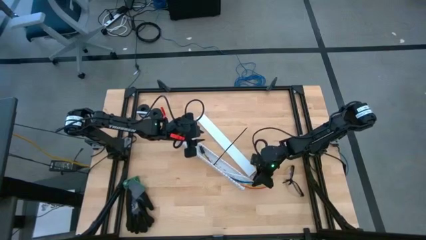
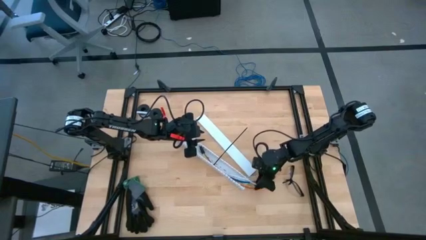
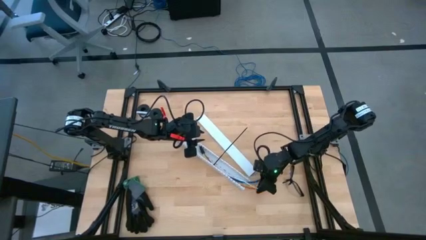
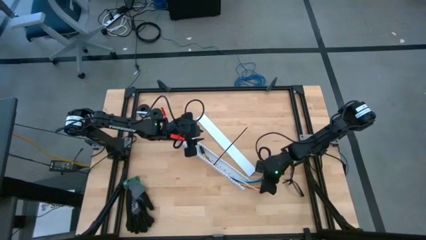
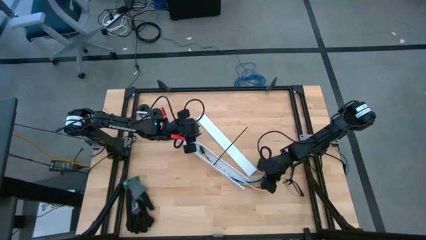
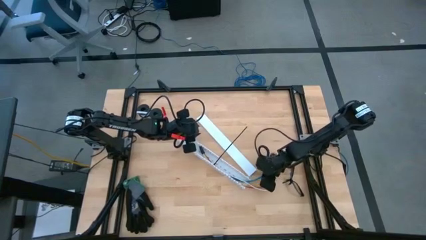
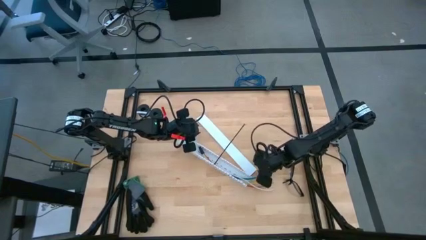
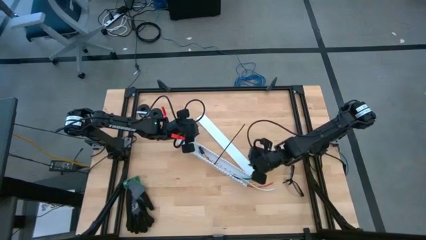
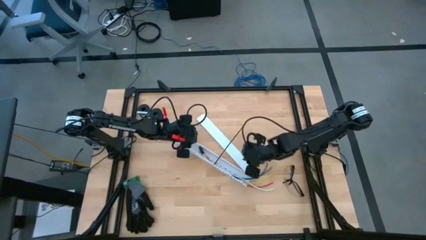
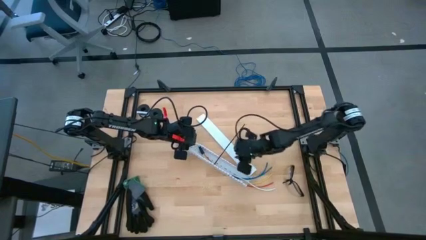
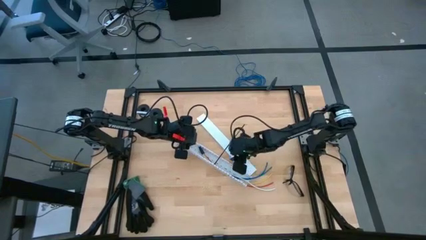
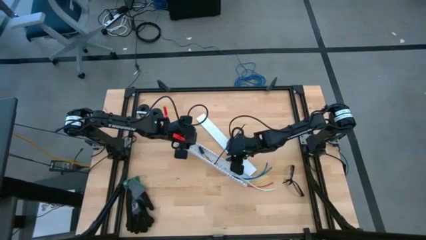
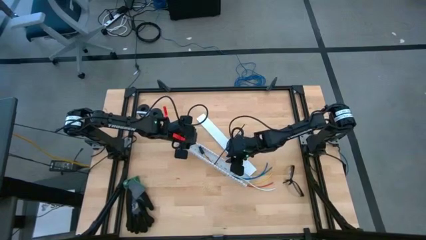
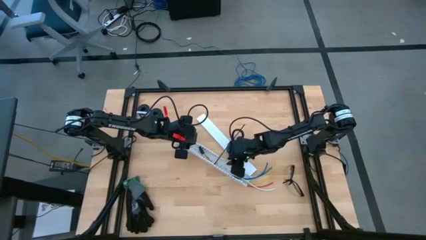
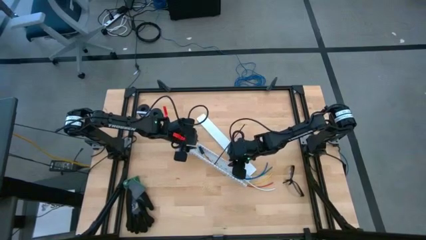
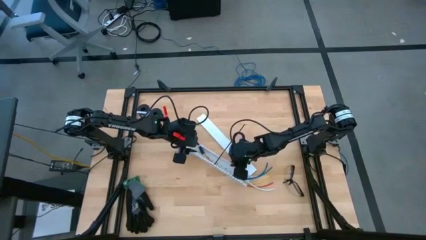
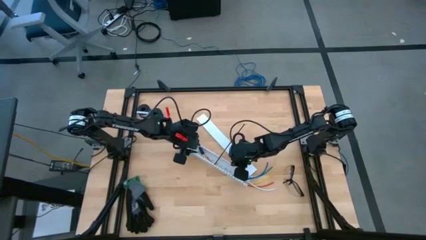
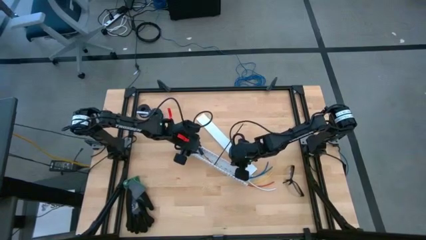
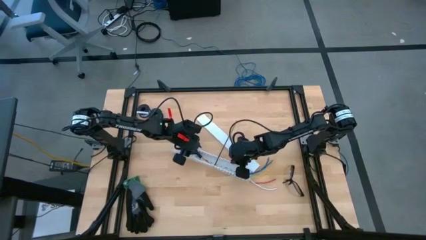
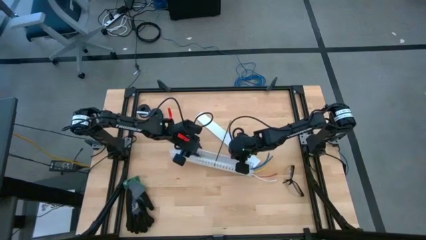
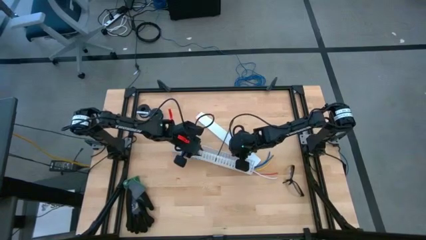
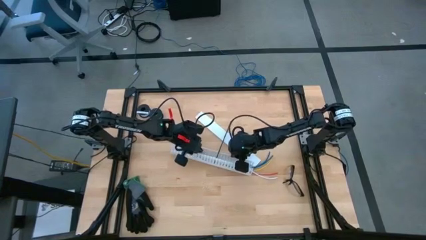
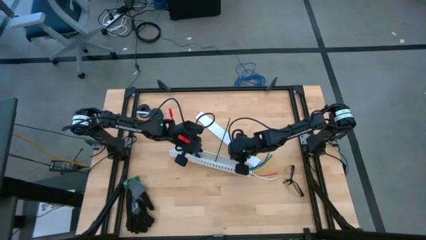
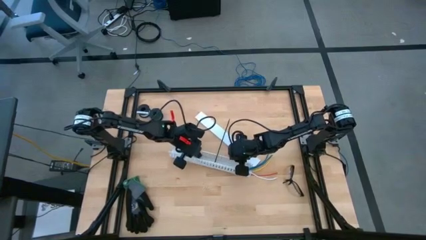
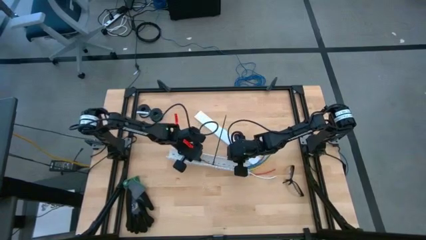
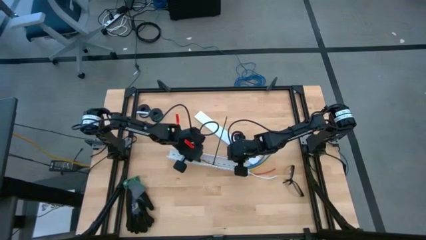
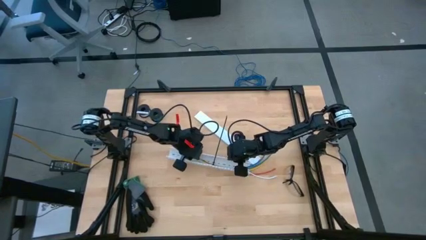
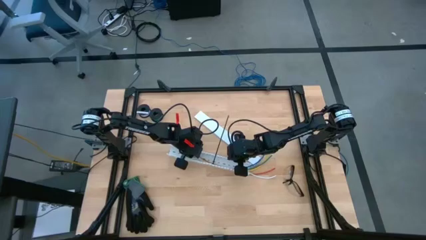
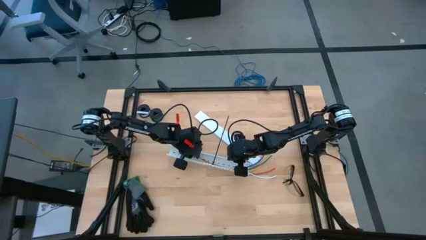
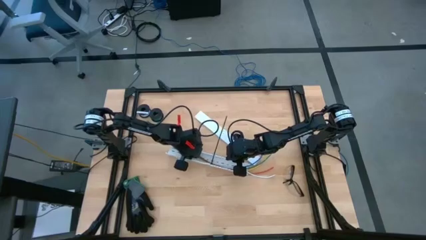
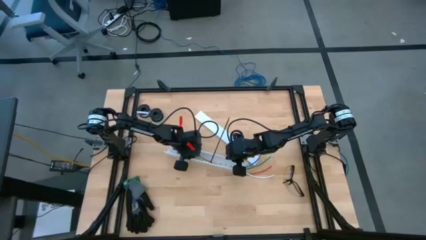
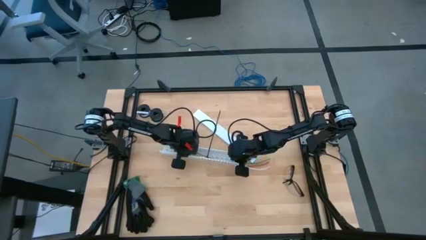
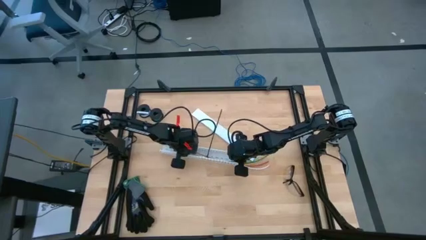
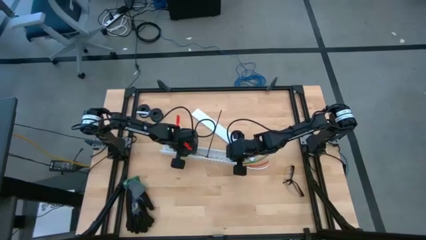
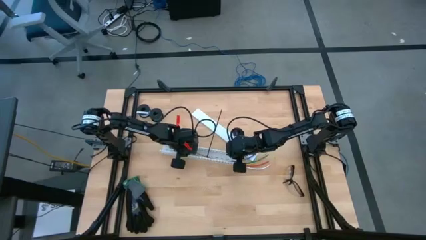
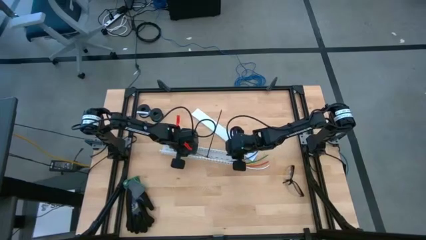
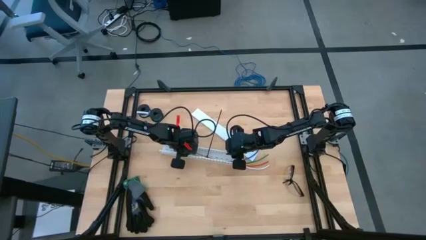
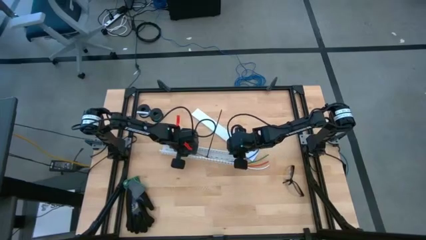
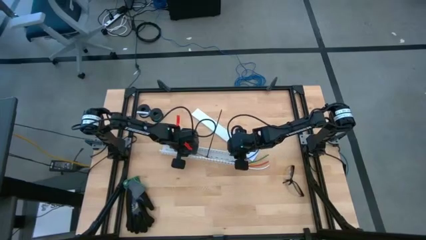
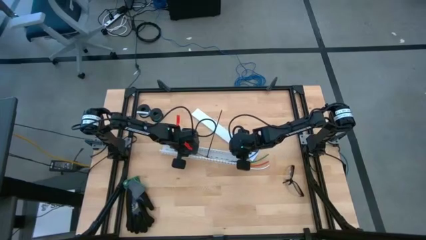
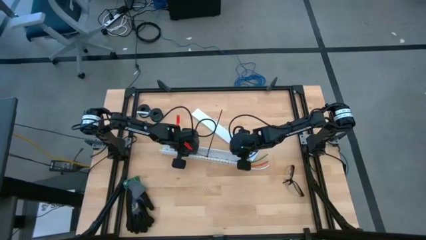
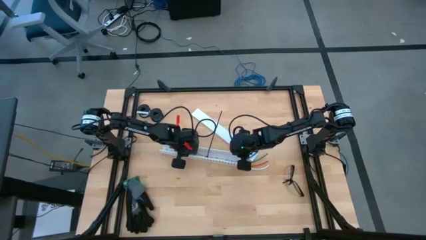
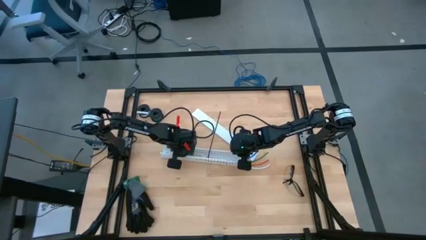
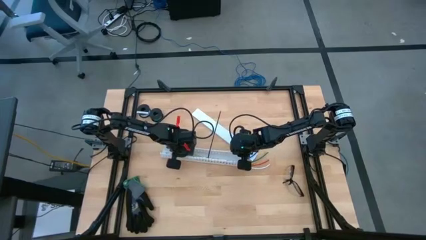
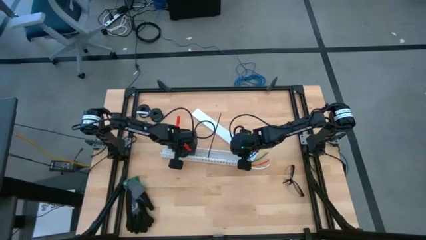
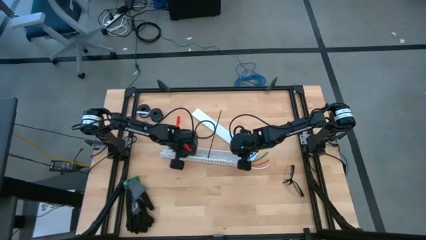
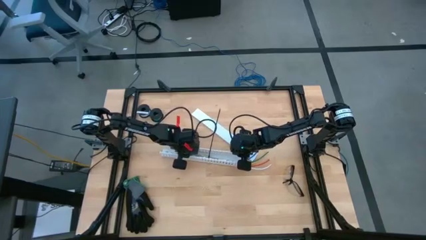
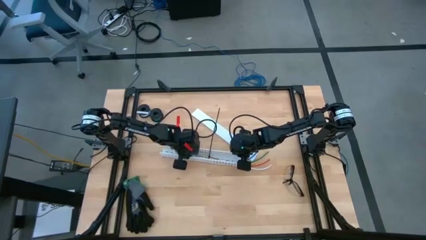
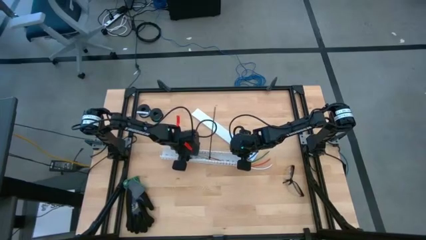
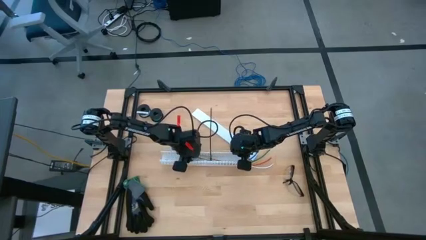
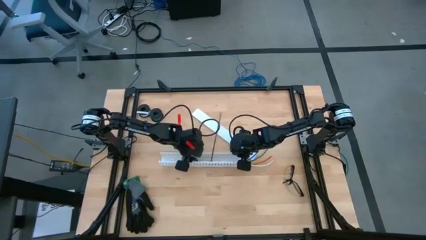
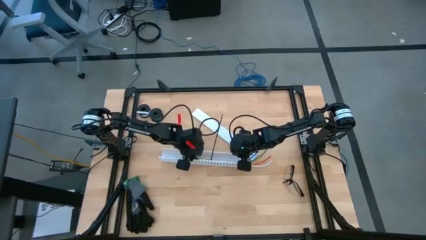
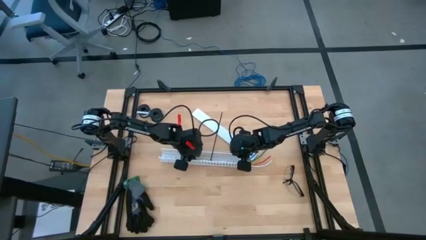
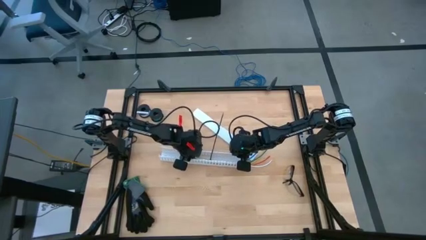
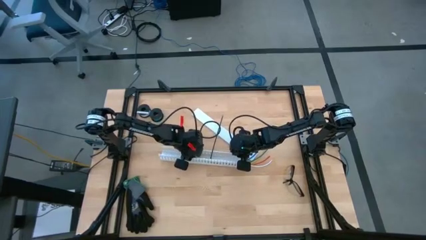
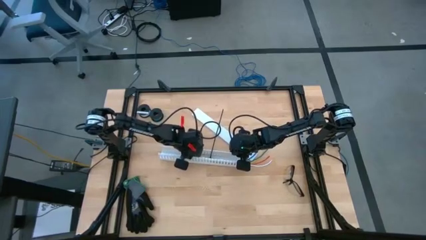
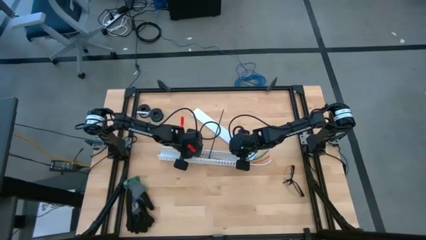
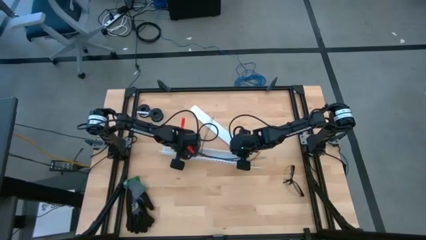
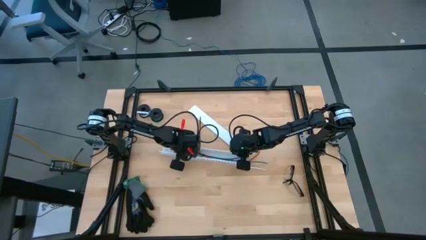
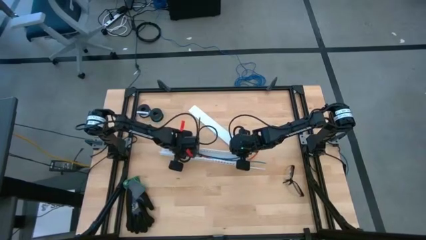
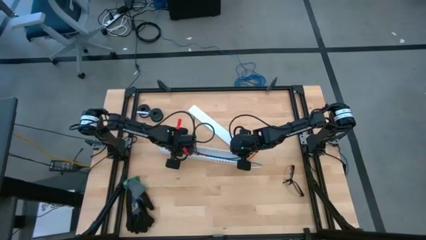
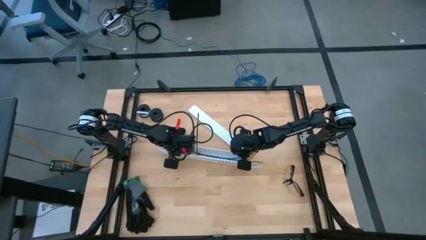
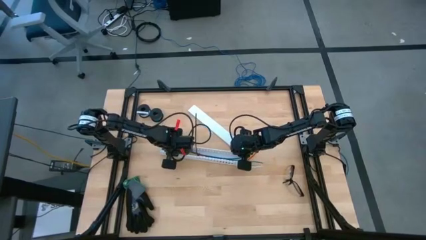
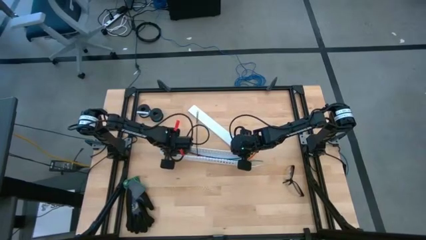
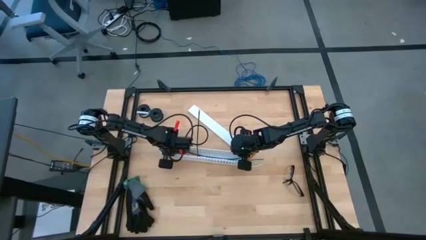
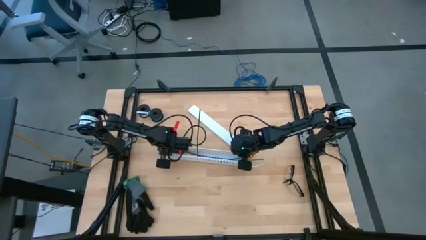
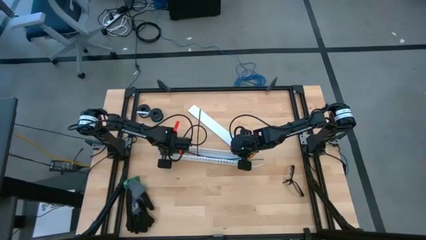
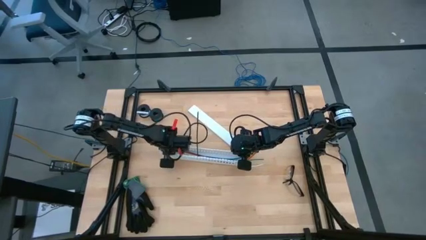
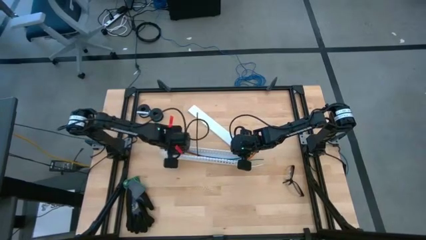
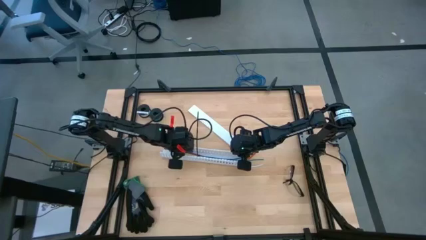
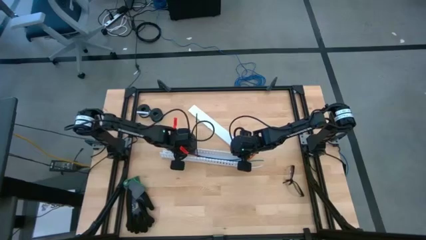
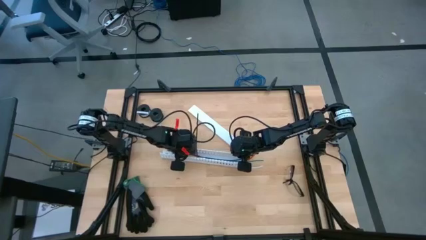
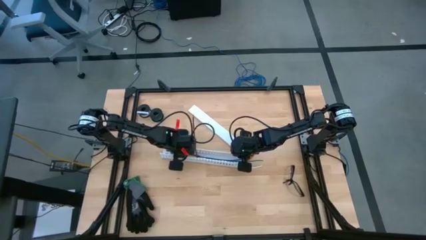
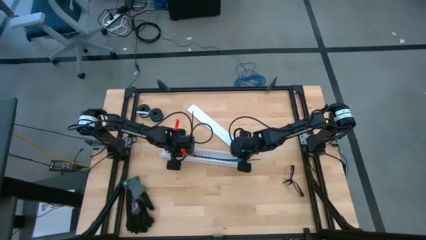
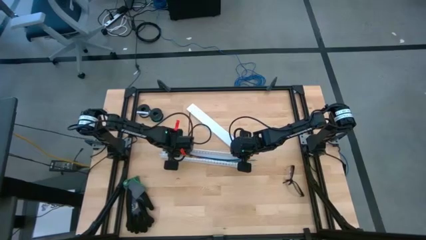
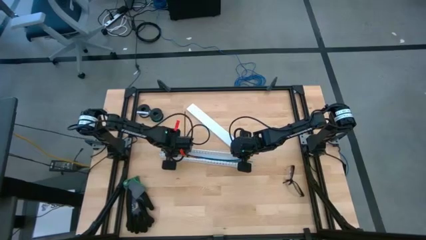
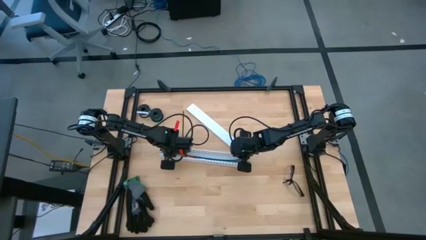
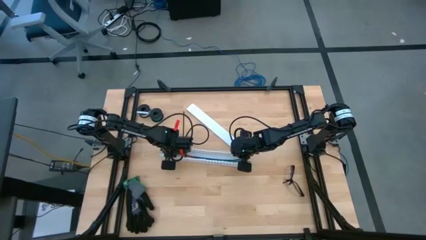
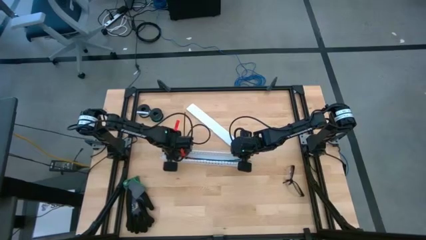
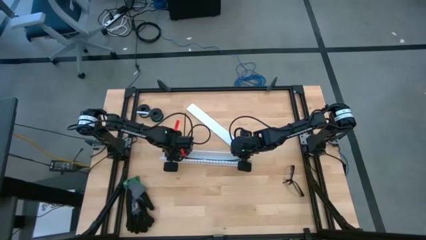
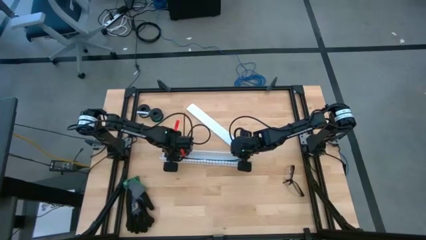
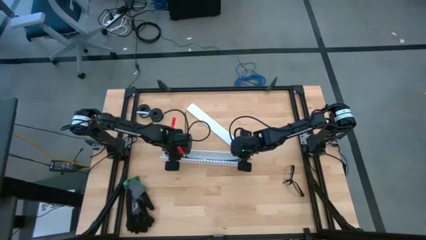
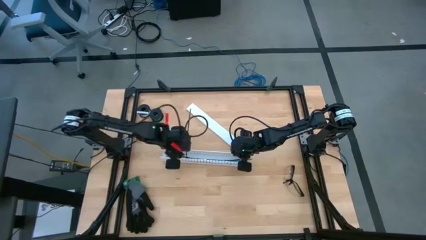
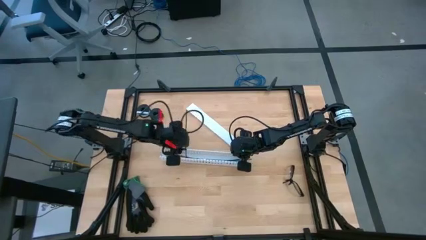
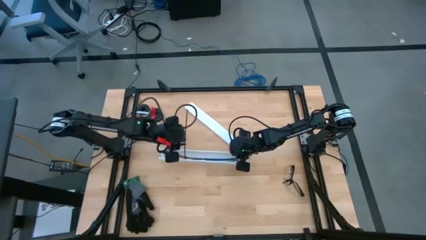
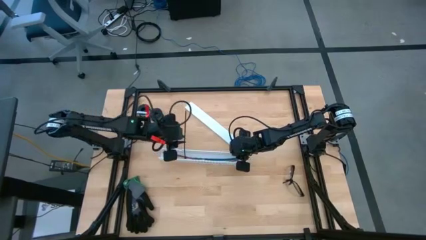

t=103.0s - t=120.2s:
Task: Ziptie cables
Put the zip-tied cables into the white cable duct
